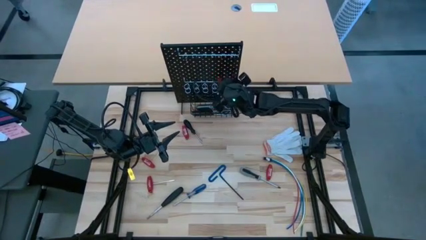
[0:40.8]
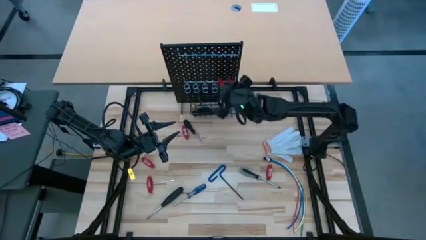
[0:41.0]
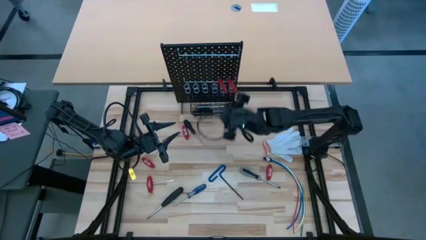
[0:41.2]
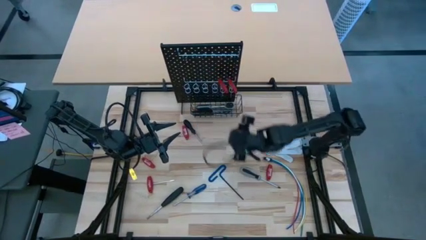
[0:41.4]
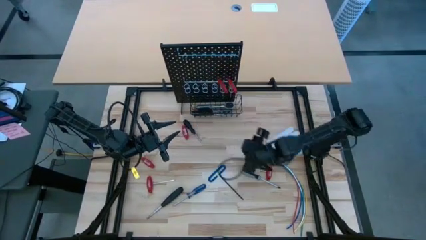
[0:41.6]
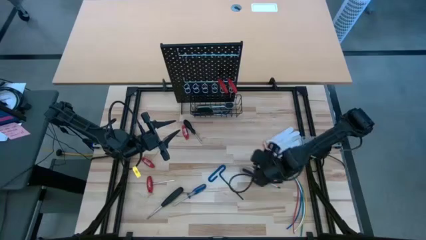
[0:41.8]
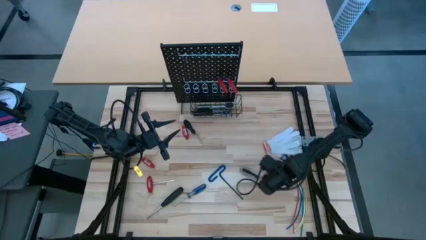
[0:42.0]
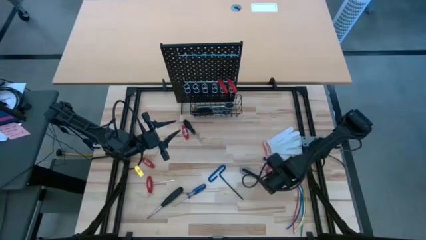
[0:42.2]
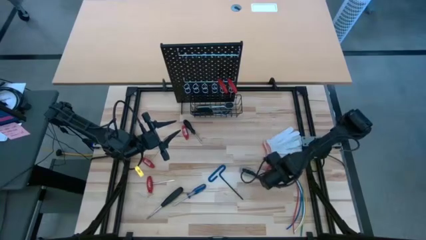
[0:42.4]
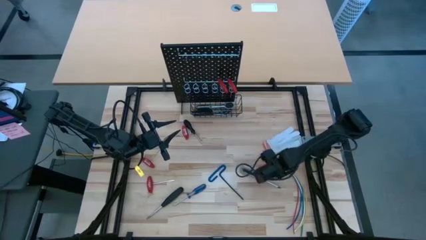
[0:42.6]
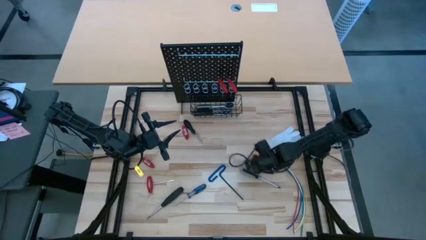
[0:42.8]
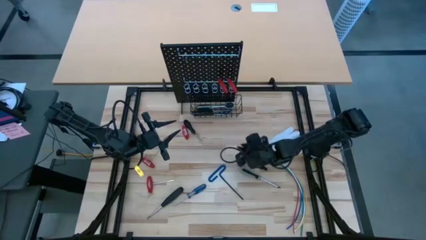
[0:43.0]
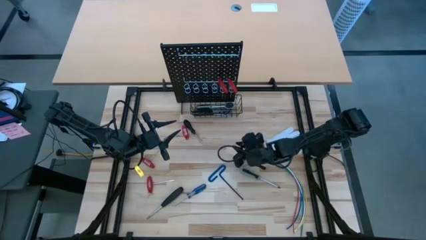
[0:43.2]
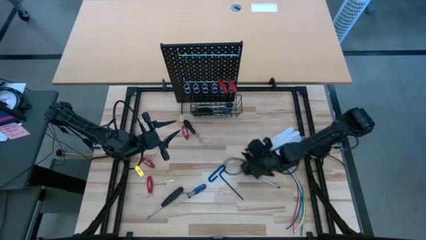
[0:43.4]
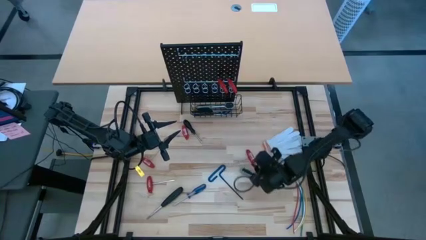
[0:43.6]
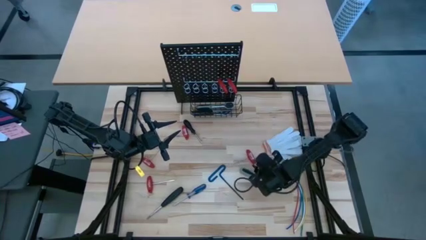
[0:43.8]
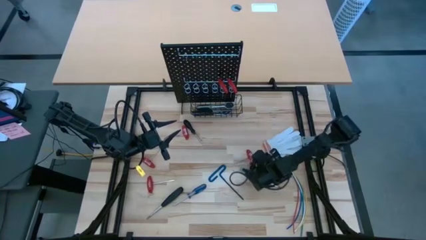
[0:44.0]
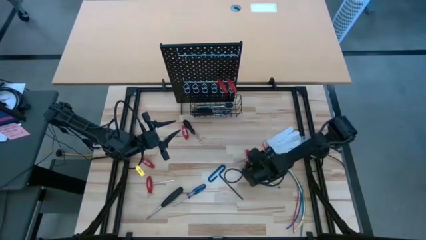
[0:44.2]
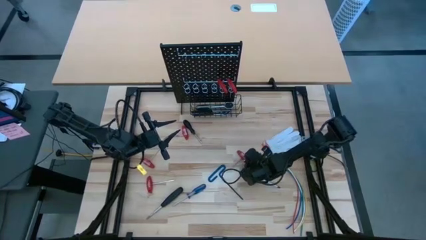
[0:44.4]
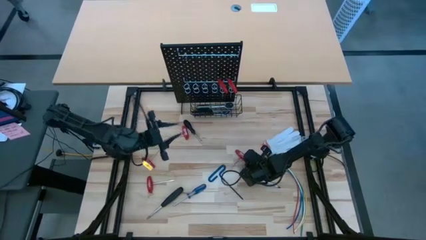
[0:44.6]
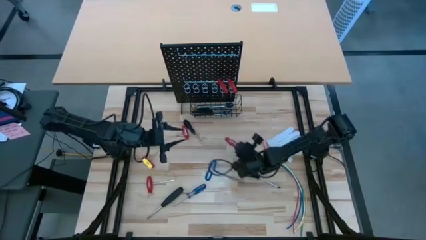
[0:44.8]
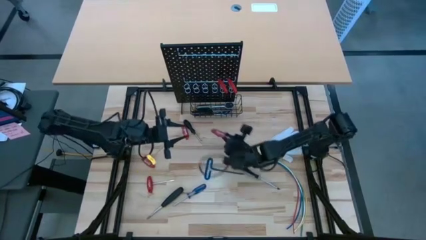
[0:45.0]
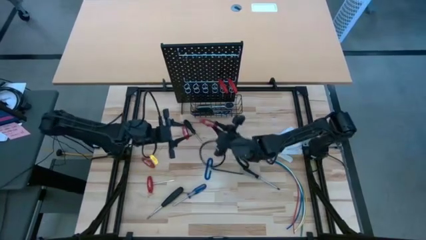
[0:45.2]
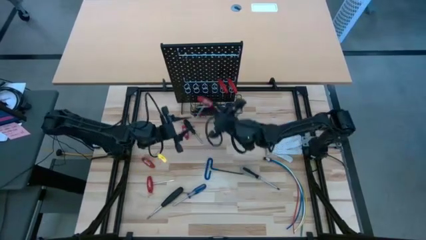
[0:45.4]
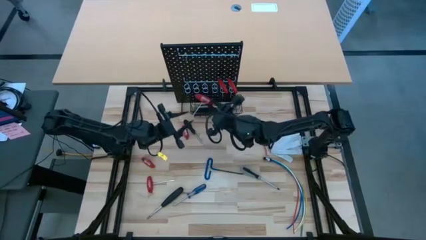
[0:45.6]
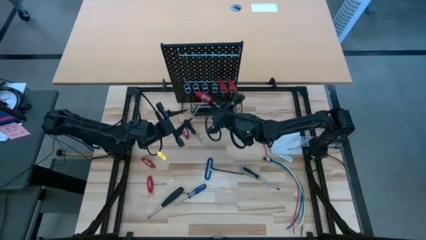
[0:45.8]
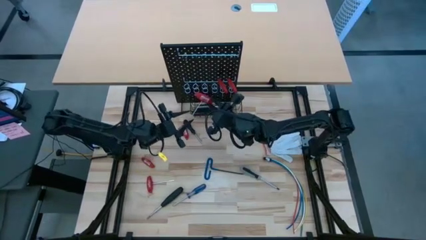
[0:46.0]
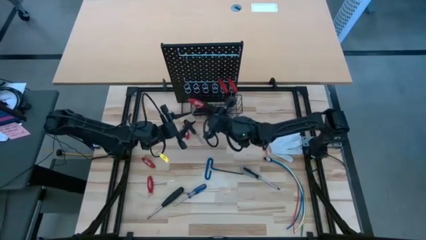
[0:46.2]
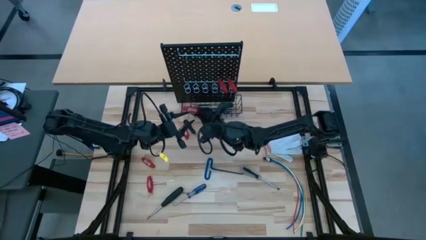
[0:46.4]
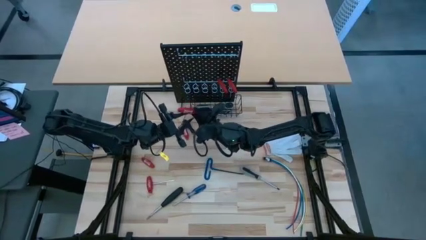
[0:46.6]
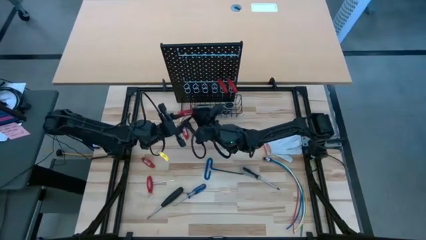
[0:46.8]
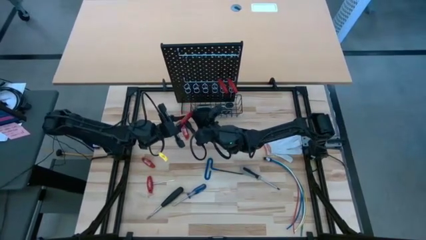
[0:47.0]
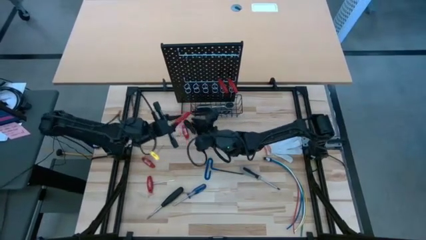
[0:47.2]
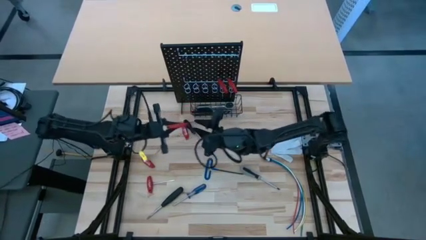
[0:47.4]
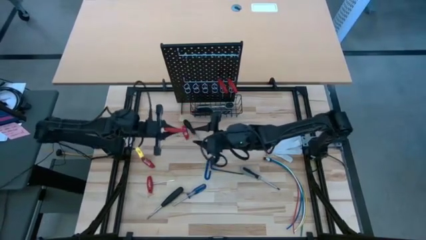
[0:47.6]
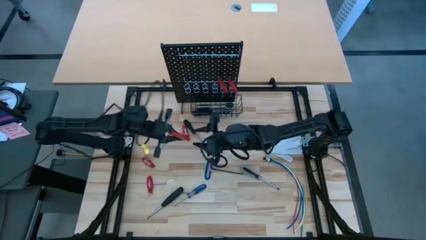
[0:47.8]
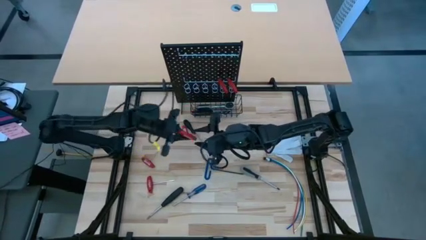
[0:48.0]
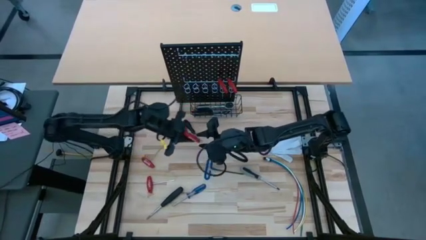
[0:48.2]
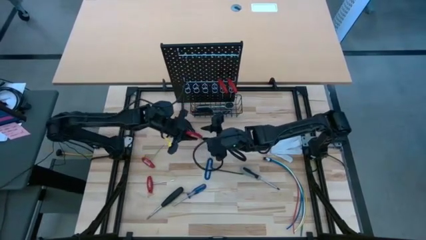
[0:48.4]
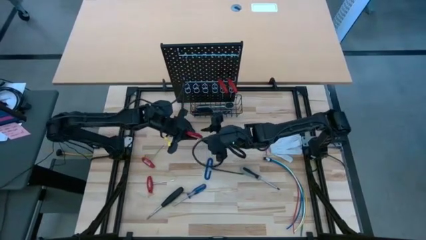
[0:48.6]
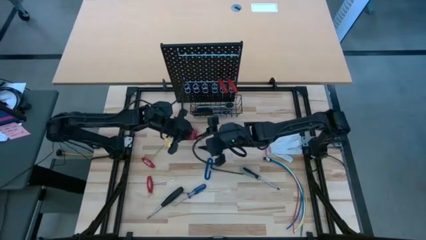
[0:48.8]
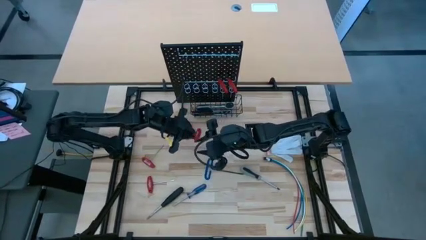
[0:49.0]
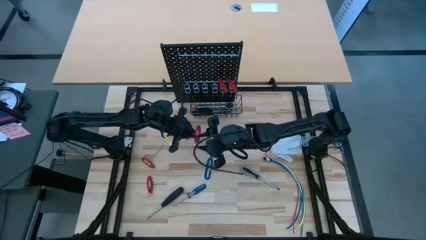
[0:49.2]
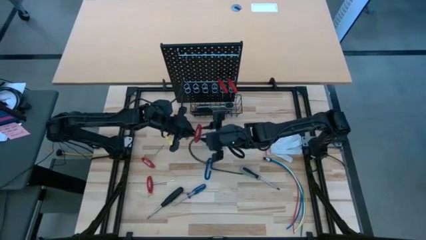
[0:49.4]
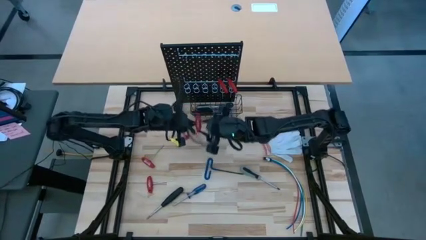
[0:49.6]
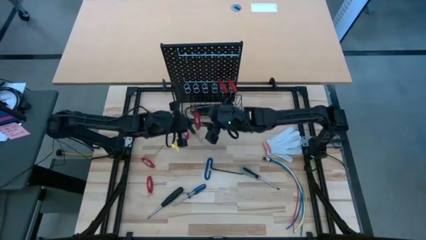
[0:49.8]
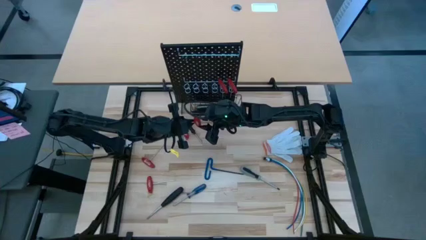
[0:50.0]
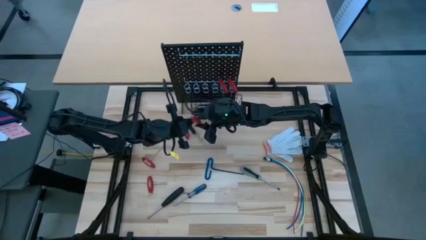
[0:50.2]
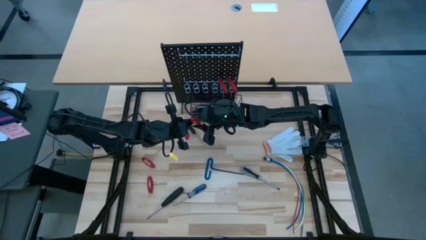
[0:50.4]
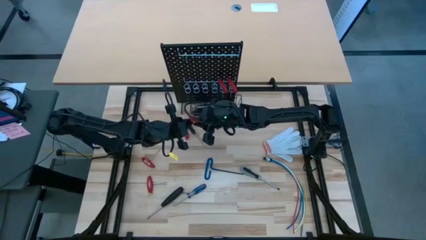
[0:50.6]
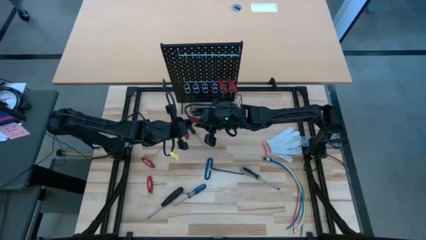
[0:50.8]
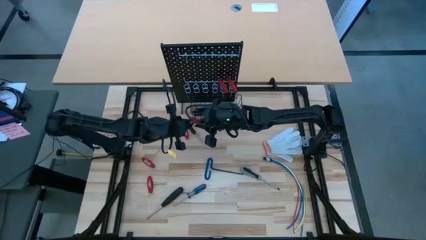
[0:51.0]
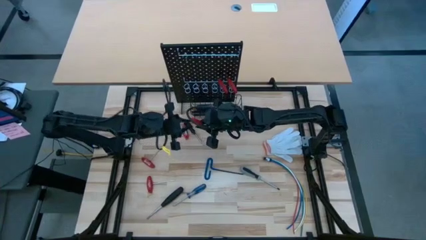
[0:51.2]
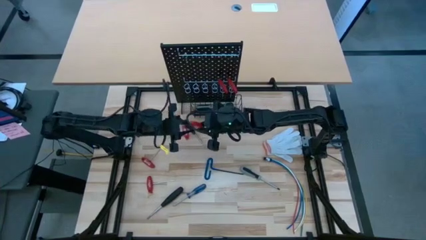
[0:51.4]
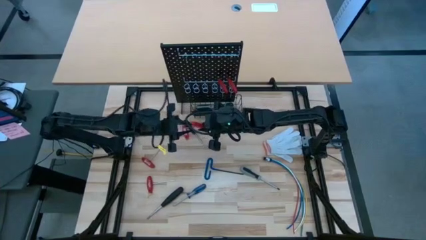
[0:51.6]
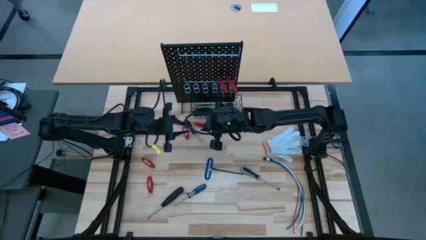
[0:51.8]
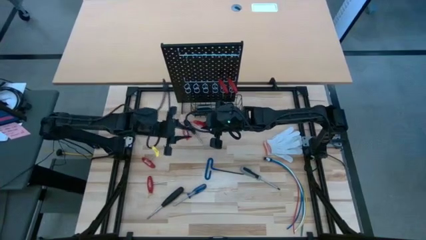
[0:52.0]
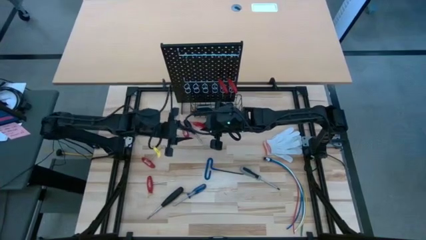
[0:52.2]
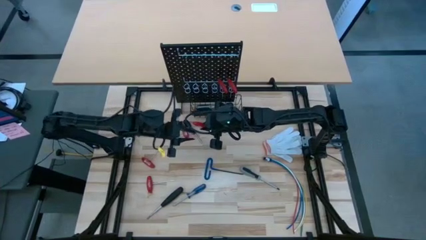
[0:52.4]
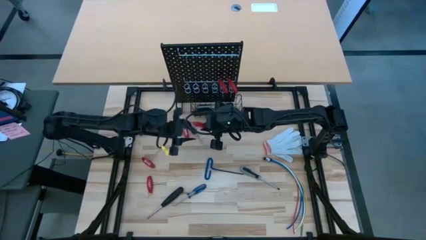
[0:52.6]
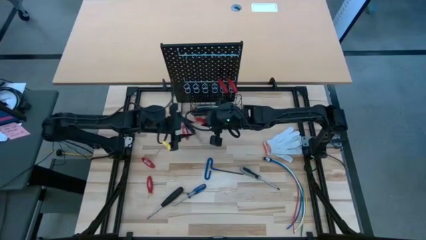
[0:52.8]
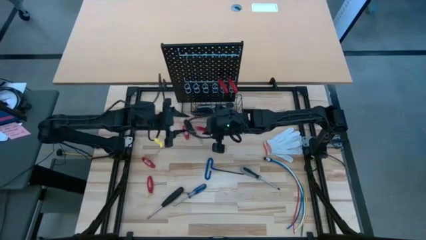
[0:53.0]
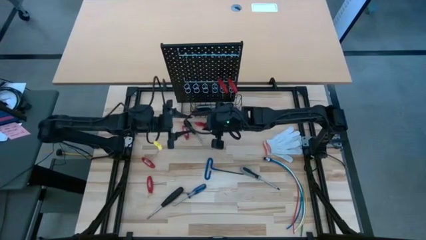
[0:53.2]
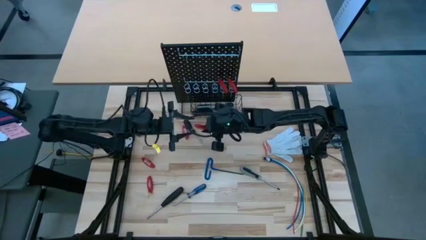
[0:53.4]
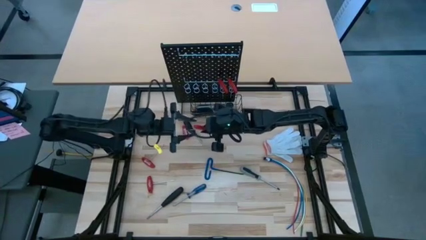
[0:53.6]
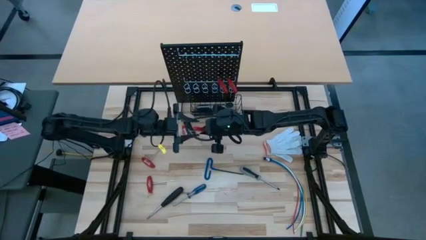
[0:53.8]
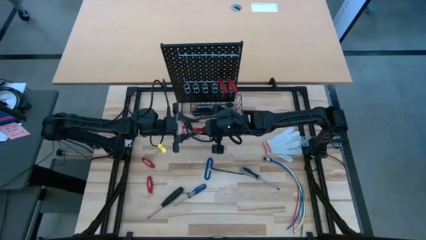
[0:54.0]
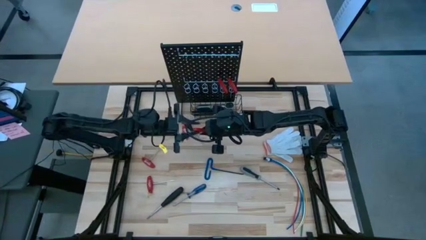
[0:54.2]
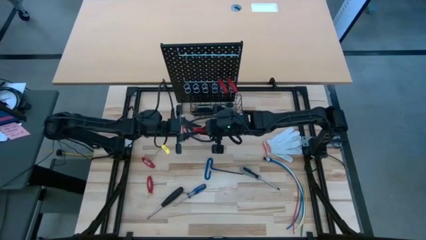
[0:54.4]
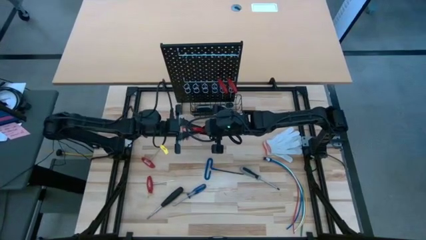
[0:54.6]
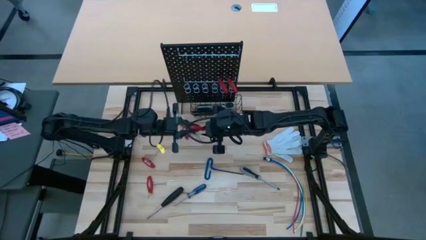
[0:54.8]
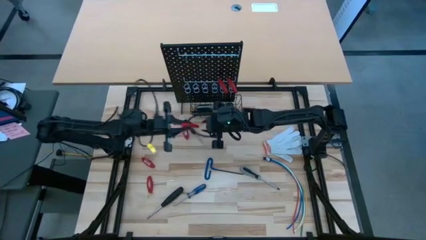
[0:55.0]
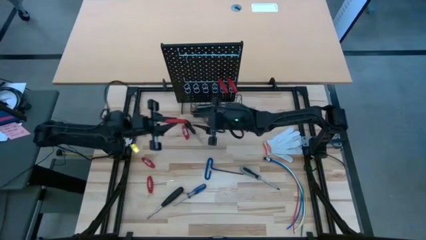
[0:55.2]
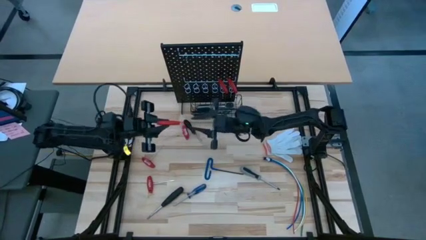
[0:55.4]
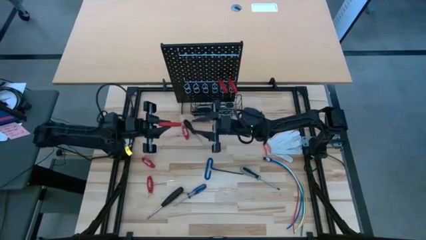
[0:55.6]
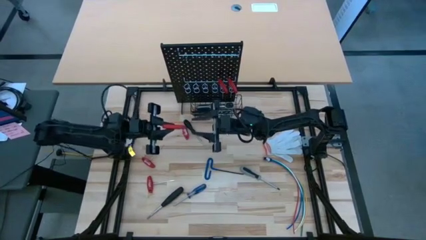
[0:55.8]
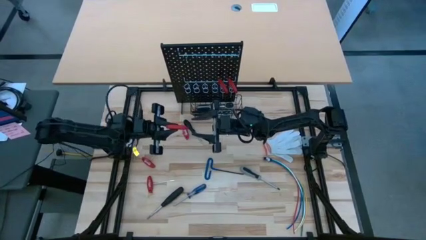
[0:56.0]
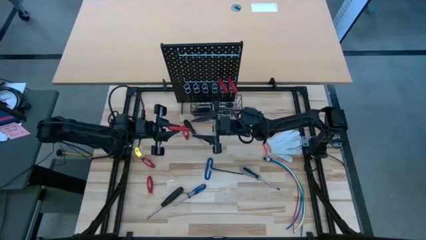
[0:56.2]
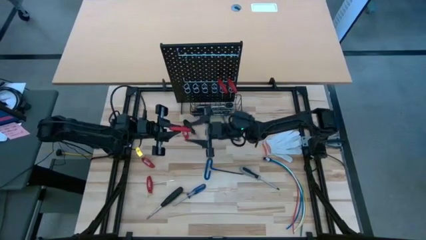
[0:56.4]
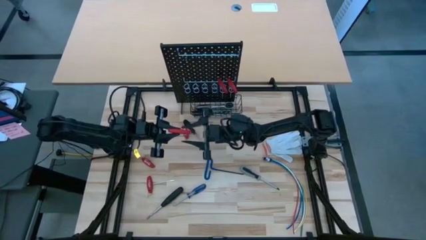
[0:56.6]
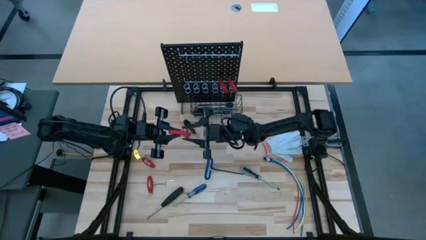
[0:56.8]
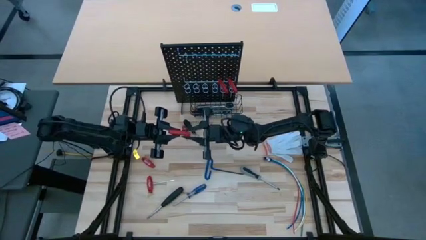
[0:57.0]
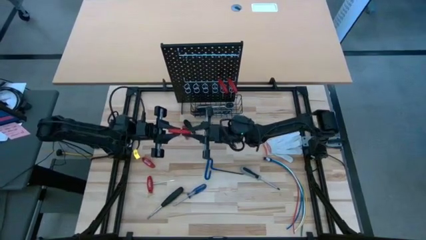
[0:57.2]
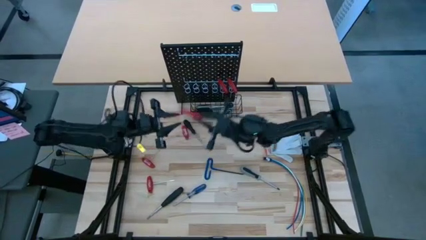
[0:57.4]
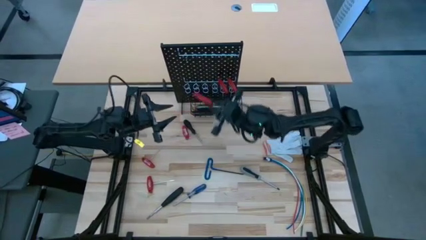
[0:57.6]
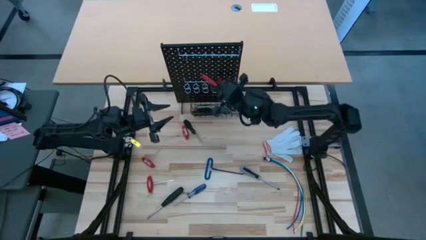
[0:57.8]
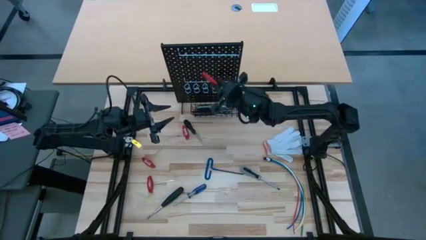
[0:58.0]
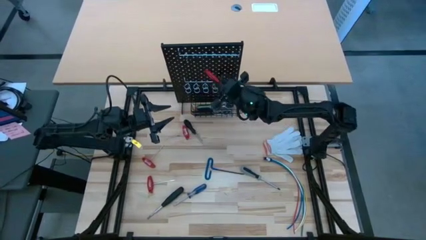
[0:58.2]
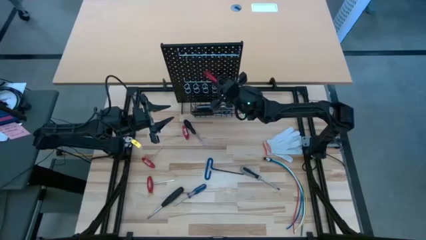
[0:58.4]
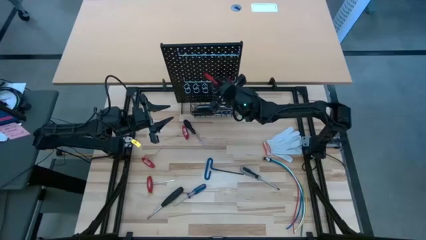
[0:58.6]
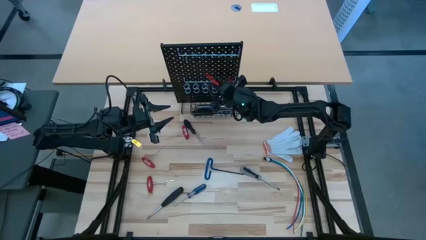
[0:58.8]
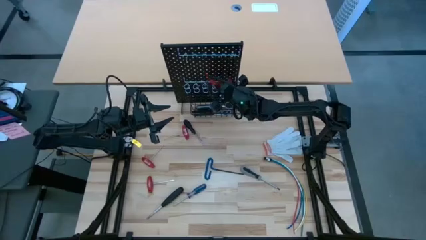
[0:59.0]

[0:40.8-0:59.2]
Task: Hang tools onto peg board
Hang the red Allen wrench on the pegboard
